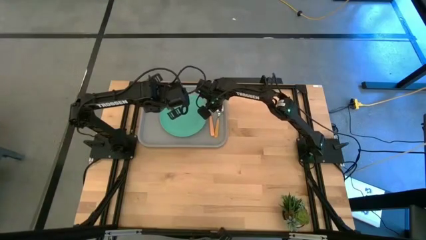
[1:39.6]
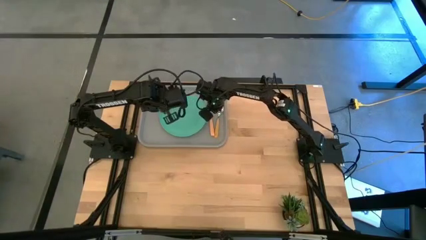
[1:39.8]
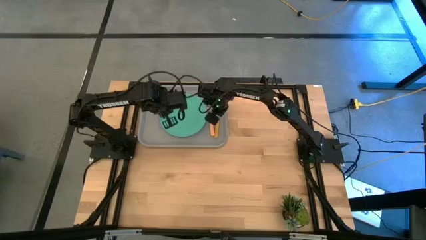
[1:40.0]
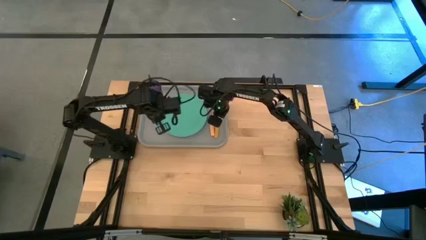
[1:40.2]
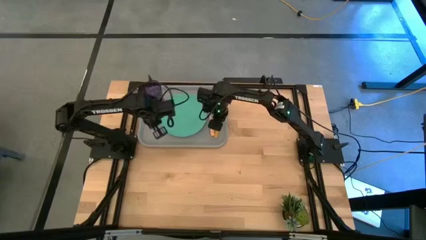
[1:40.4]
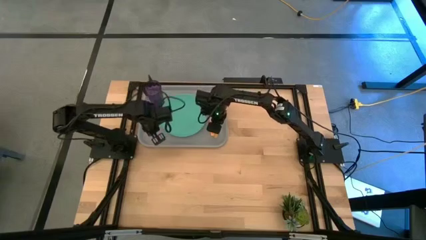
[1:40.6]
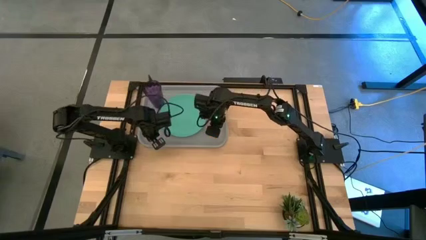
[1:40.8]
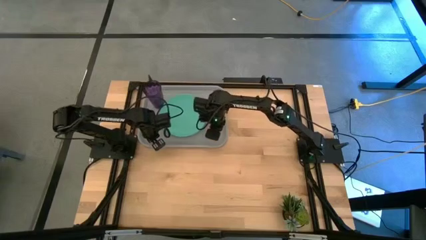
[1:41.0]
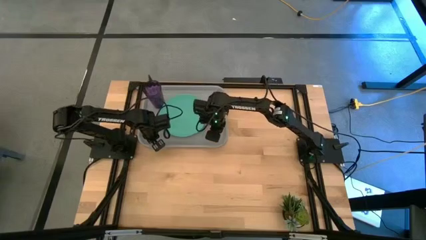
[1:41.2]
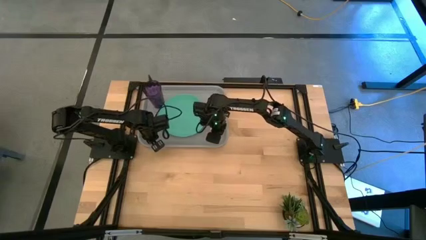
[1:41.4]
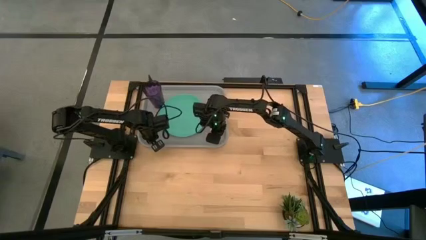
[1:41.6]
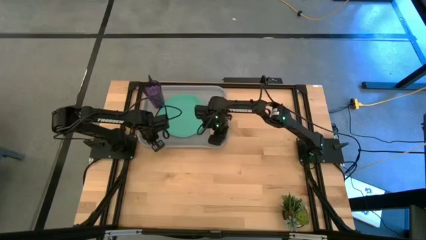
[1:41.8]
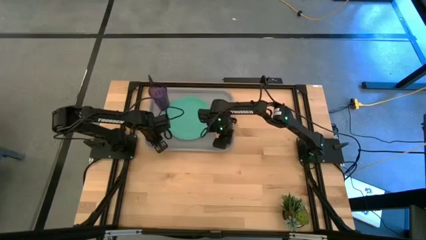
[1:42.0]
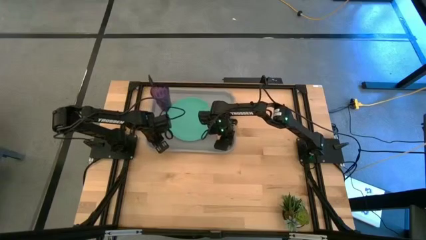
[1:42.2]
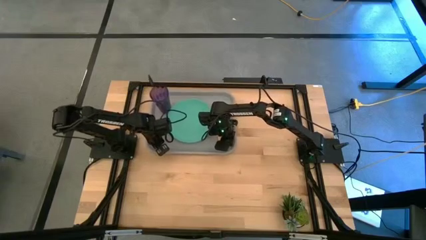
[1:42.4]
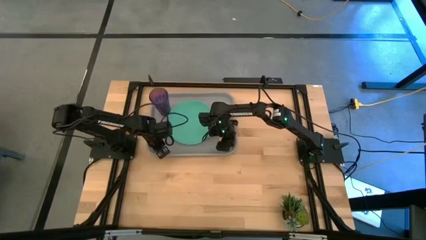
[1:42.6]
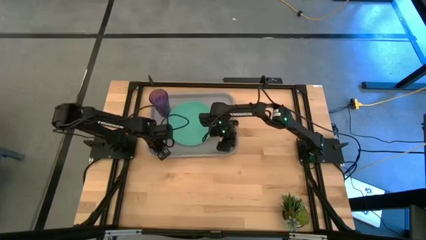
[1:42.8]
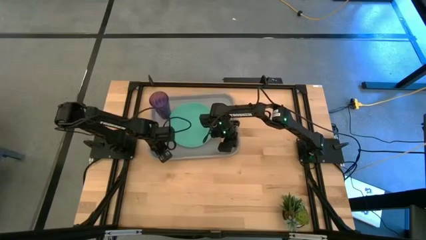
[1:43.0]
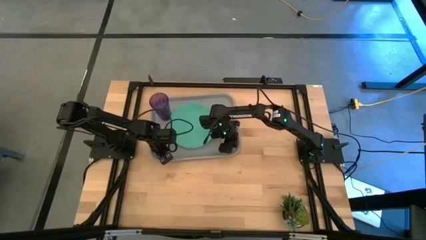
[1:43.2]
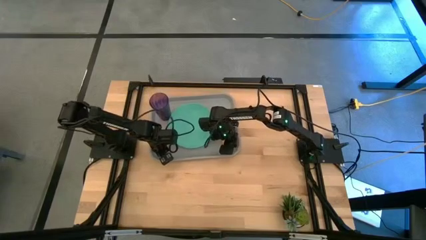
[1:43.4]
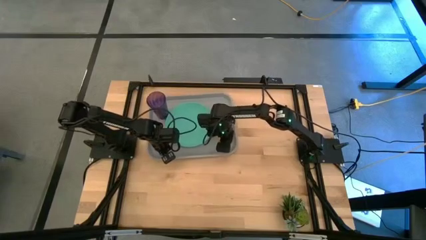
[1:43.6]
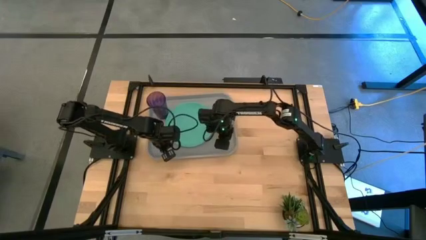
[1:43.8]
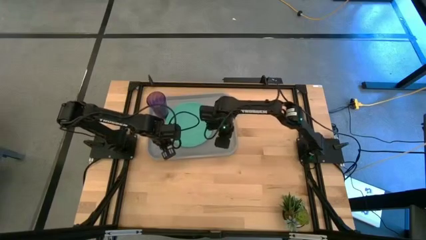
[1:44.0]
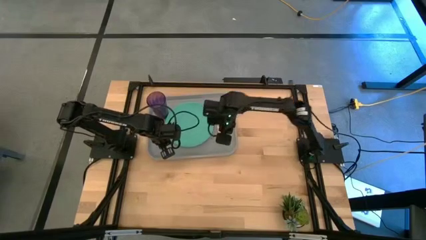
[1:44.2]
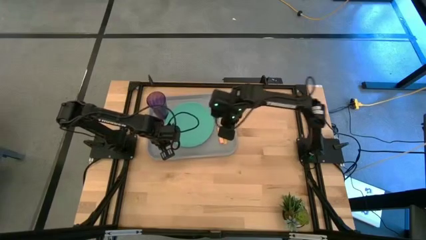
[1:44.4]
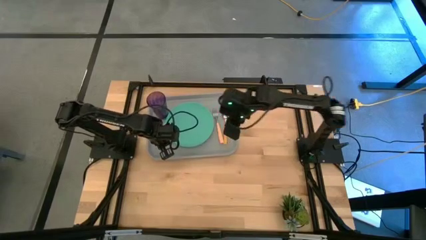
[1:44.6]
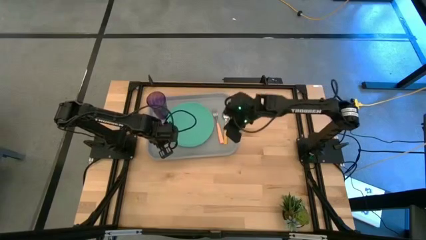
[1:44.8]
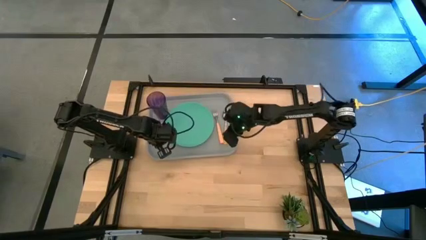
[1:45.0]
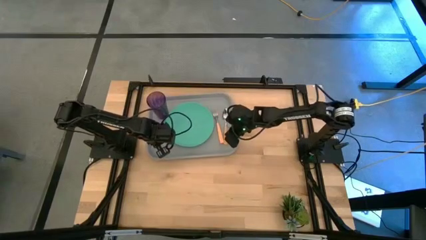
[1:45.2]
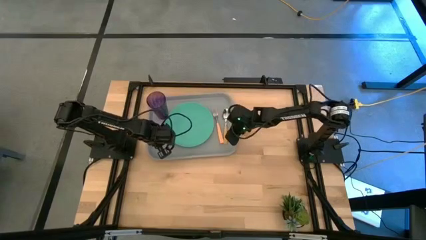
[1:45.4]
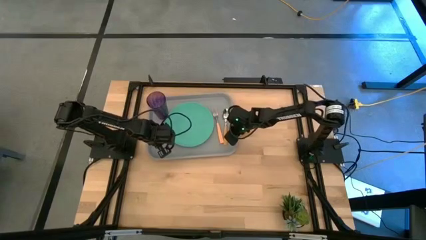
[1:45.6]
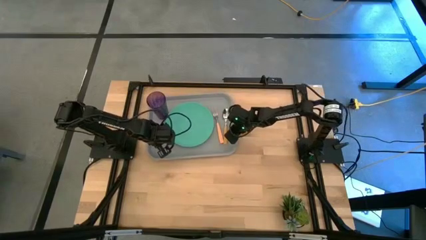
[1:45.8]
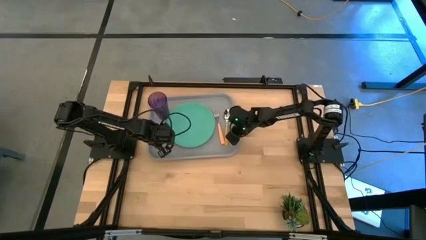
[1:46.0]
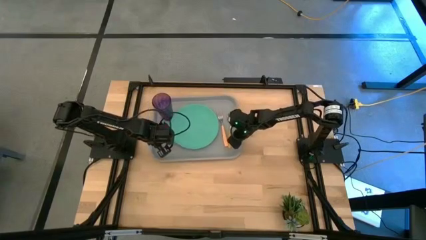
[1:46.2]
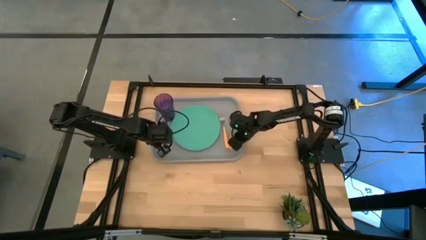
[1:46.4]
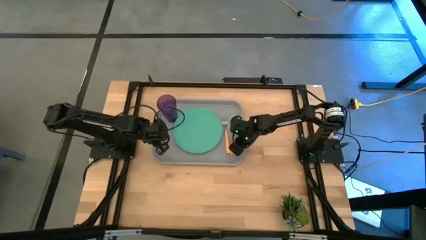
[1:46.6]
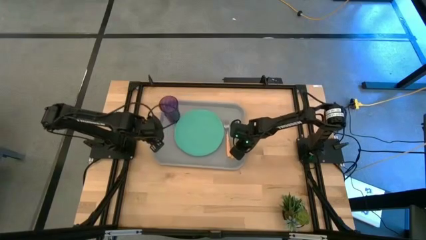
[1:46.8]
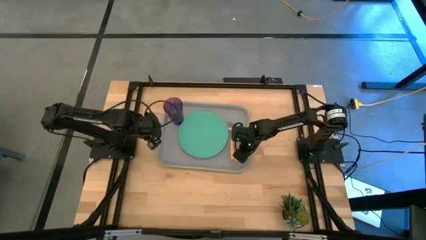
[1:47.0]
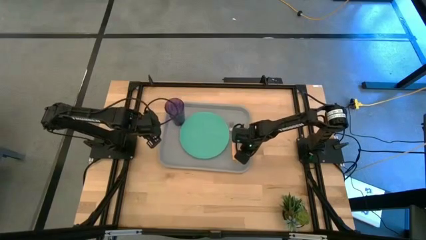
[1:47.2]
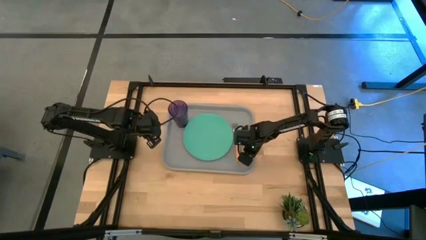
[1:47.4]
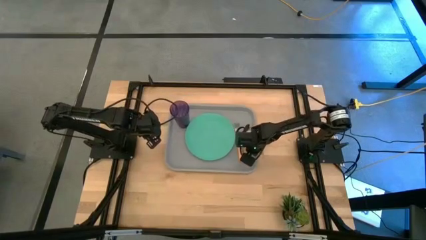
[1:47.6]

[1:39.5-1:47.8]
Task: Pick and place plate/cup/fork/spoon on tray
Adjust the gray tray

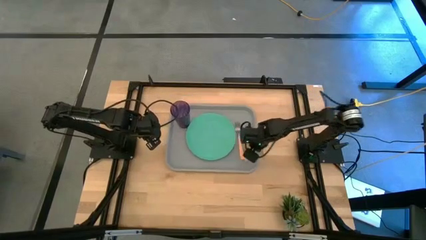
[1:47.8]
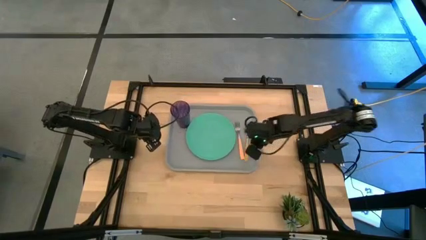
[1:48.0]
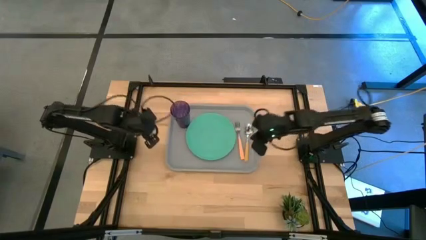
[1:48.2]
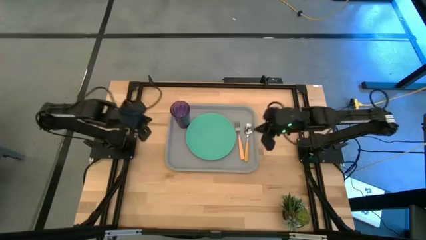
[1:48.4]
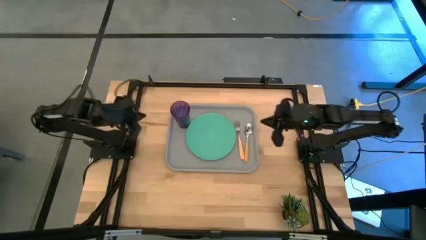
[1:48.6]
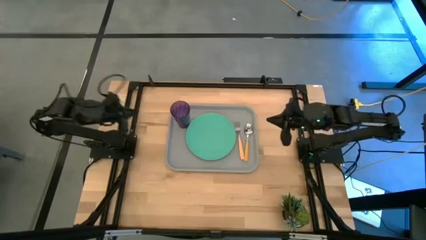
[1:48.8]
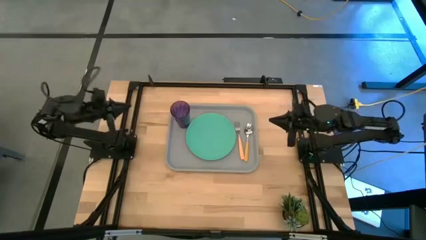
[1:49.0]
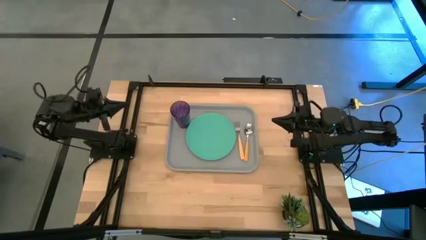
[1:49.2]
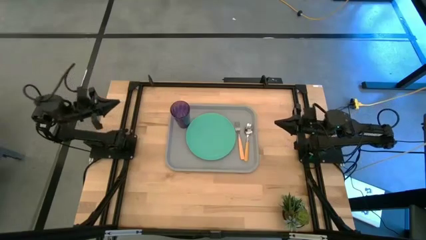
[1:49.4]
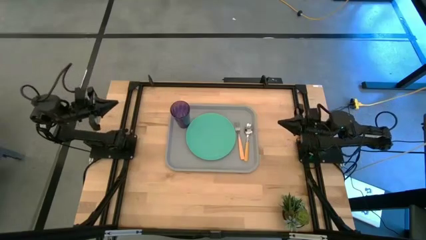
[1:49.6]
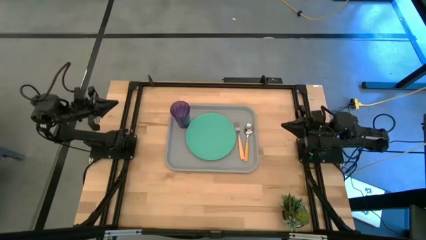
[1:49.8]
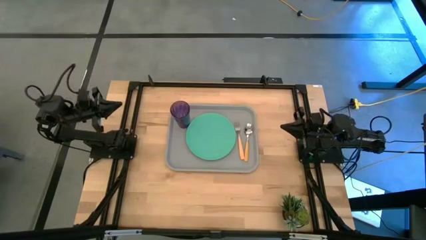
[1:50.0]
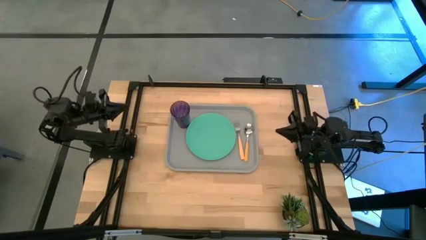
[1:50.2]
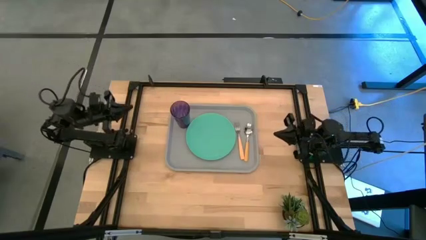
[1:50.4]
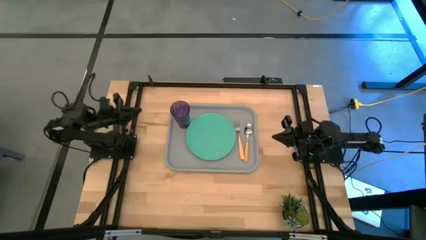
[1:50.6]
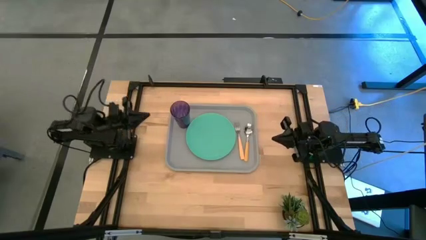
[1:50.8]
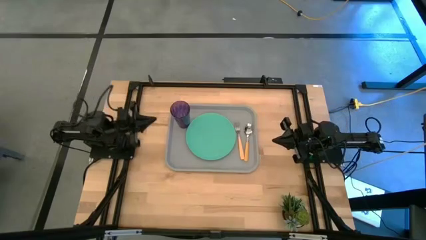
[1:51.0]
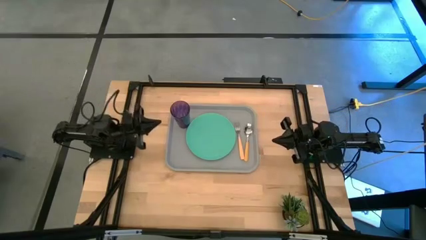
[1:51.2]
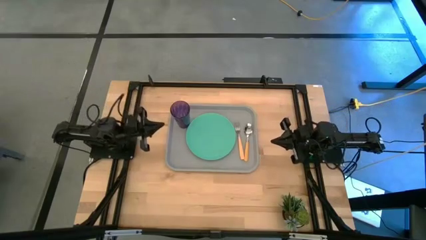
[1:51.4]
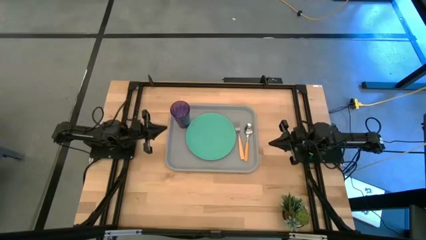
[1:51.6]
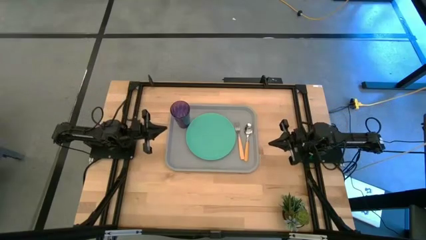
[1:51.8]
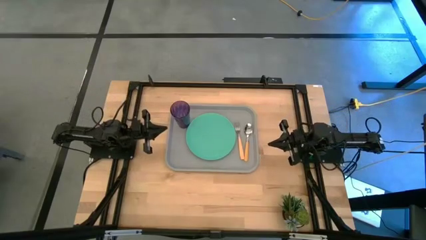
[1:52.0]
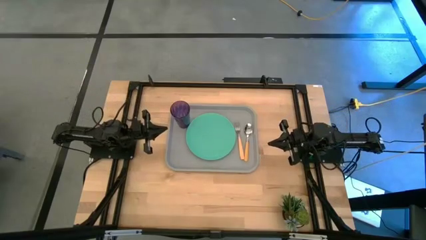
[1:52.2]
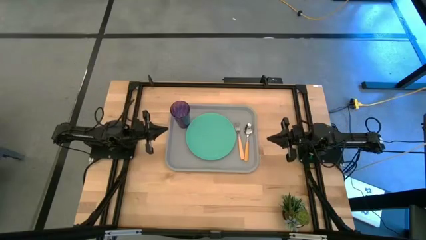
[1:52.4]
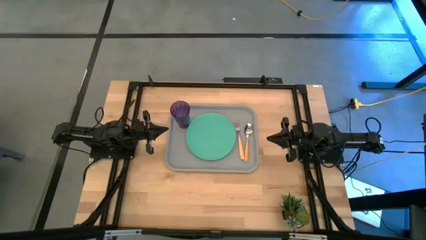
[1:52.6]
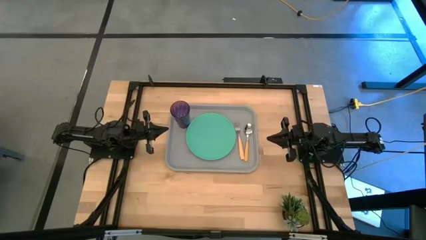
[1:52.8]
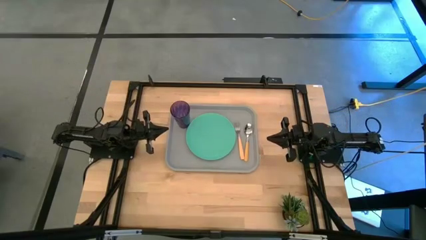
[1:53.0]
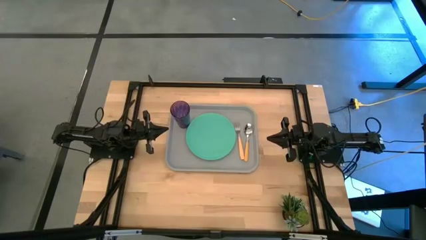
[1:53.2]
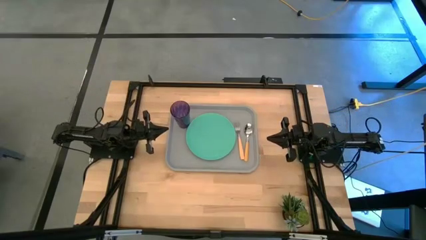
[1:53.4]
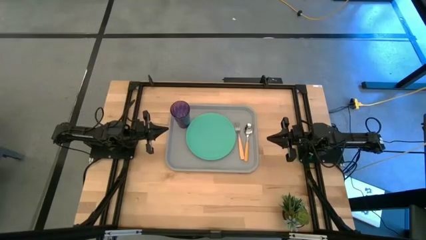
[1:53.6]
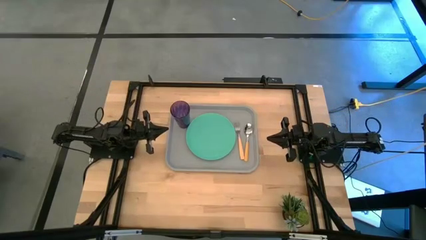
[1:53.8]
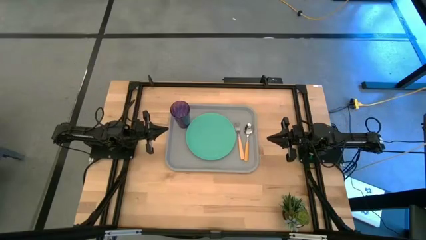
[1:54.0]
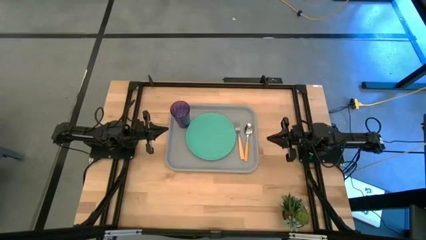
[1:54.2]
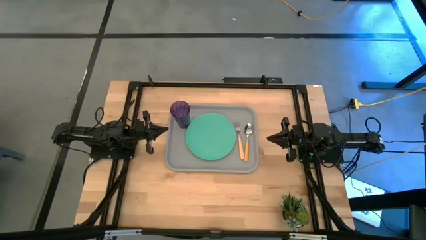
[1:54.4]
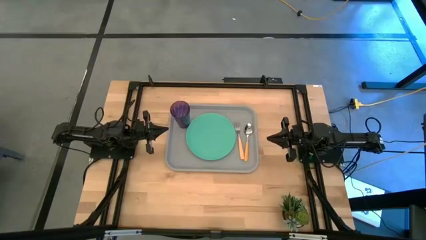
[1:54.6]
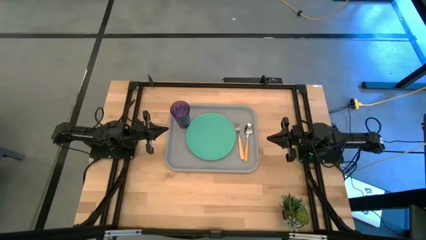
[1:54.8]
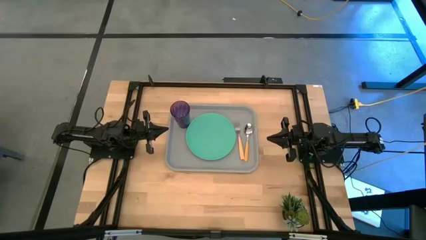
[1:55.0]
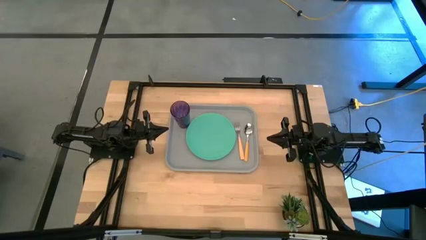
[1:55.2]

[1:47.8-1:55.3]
Return to Home position
